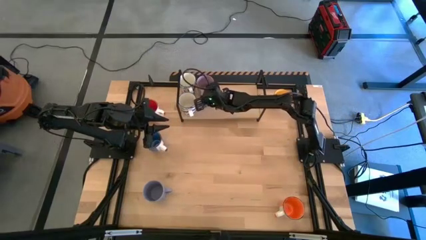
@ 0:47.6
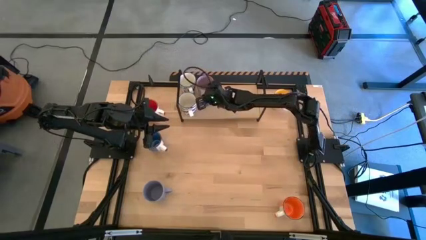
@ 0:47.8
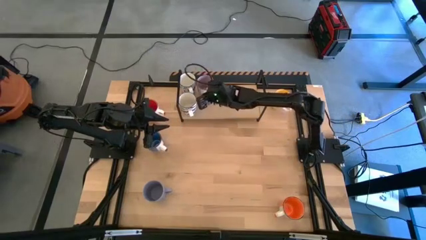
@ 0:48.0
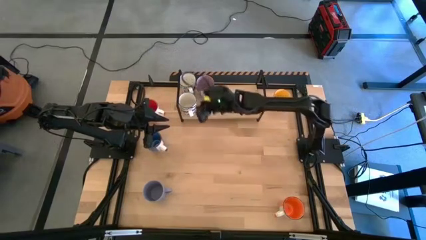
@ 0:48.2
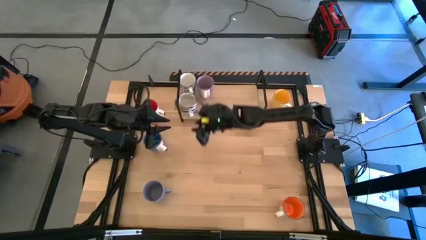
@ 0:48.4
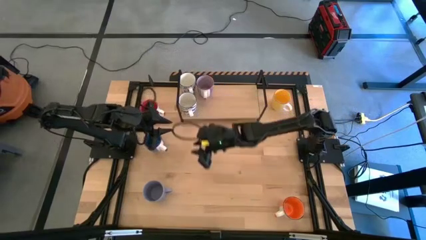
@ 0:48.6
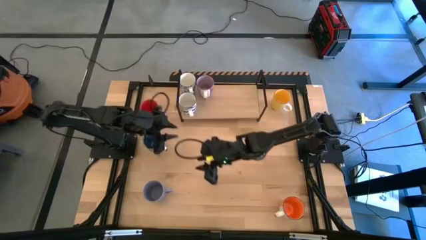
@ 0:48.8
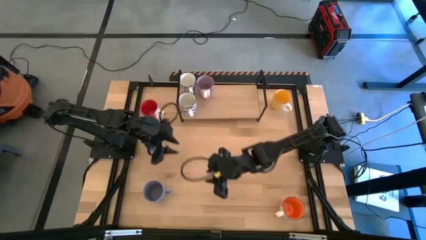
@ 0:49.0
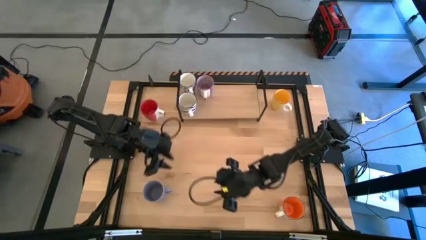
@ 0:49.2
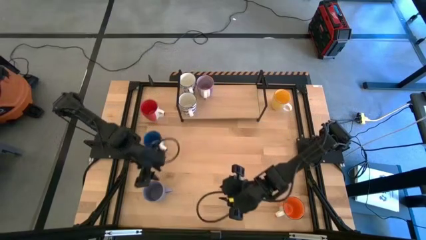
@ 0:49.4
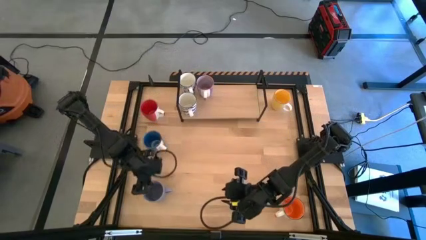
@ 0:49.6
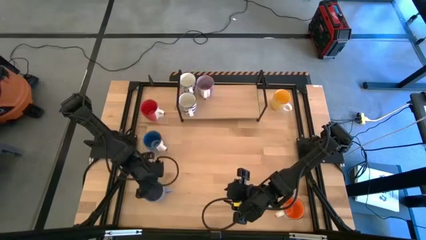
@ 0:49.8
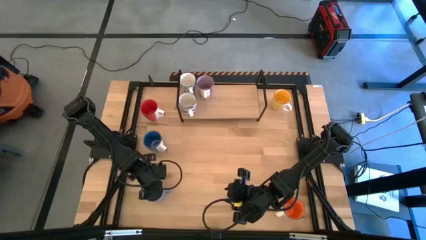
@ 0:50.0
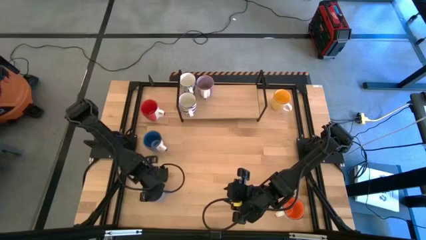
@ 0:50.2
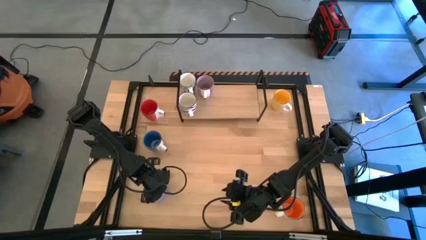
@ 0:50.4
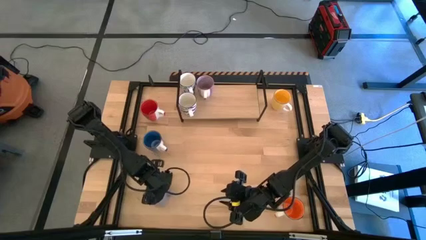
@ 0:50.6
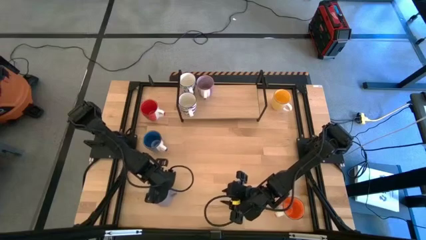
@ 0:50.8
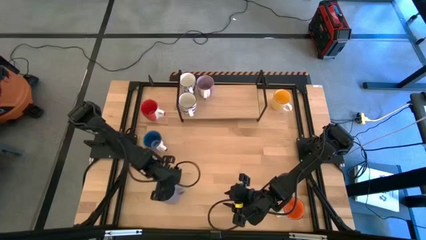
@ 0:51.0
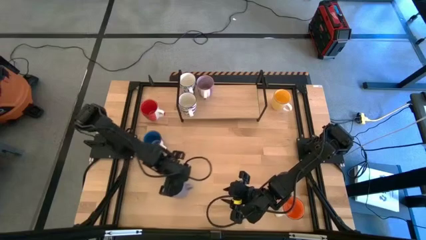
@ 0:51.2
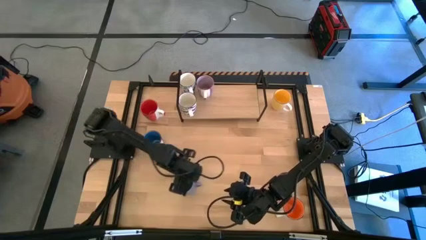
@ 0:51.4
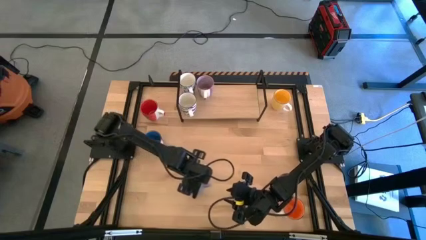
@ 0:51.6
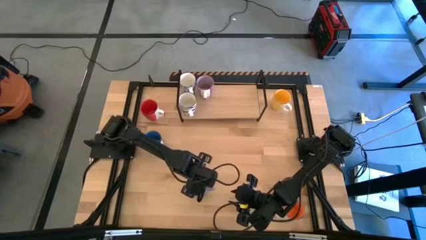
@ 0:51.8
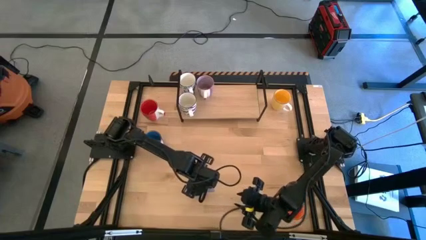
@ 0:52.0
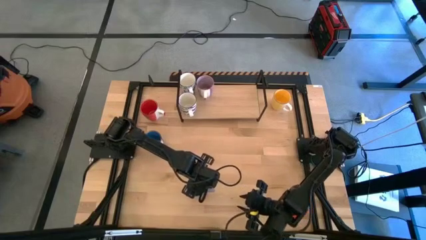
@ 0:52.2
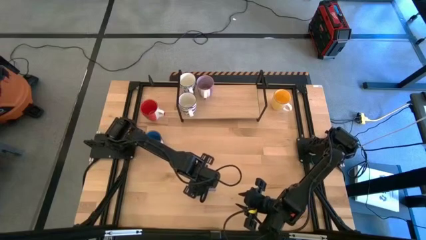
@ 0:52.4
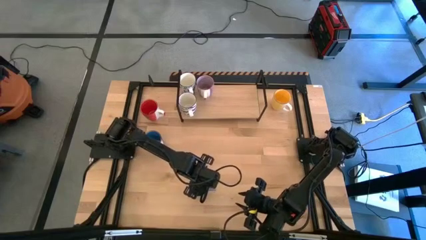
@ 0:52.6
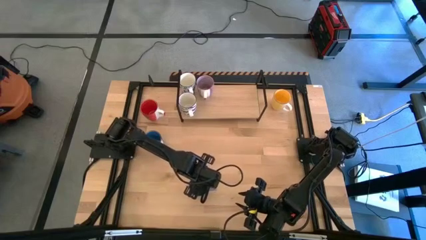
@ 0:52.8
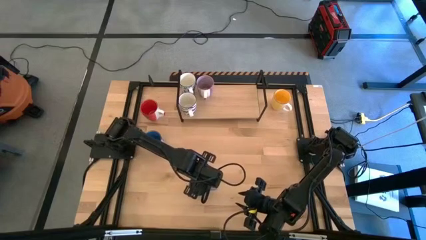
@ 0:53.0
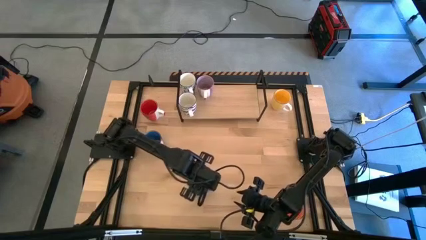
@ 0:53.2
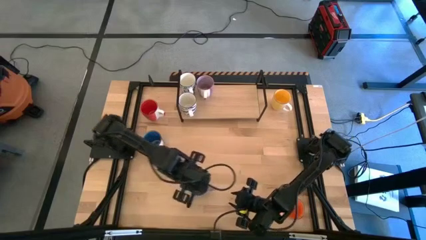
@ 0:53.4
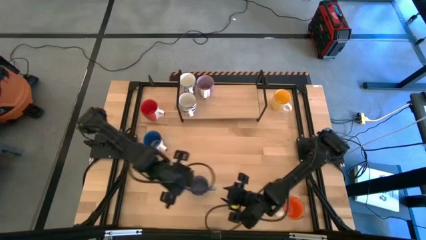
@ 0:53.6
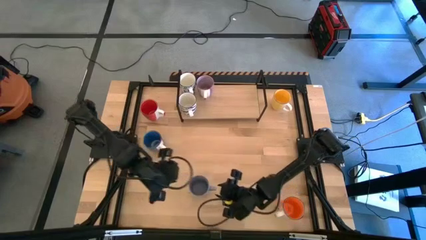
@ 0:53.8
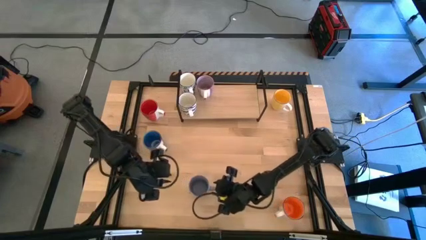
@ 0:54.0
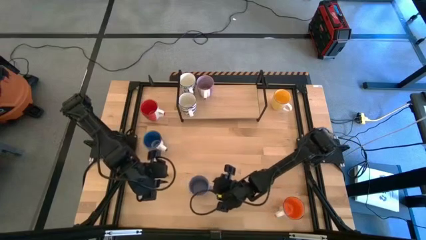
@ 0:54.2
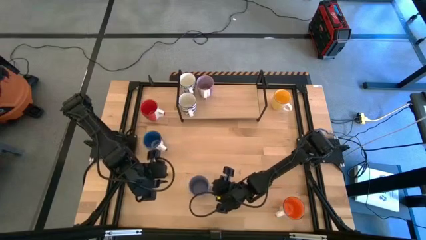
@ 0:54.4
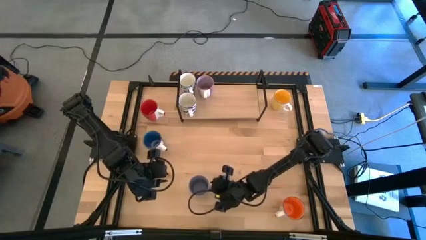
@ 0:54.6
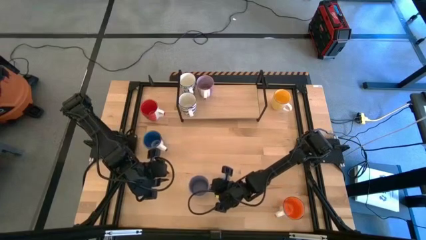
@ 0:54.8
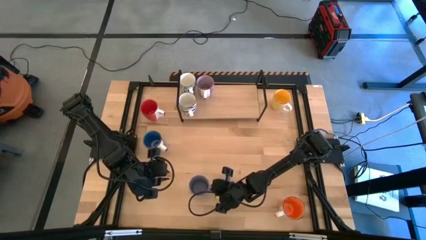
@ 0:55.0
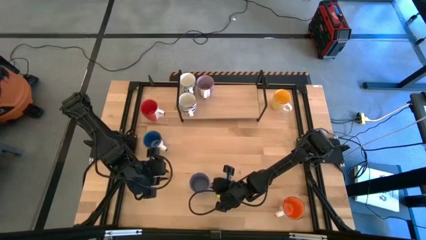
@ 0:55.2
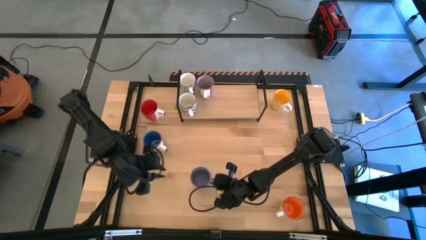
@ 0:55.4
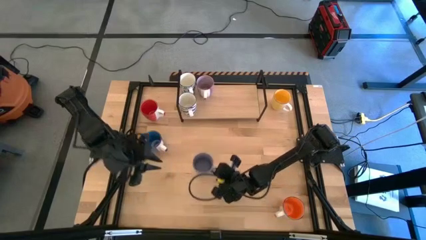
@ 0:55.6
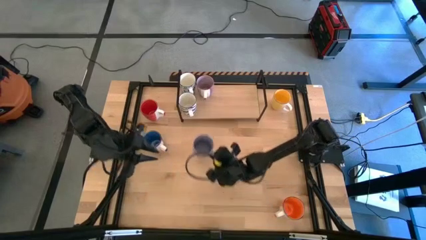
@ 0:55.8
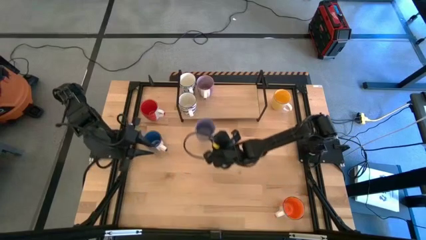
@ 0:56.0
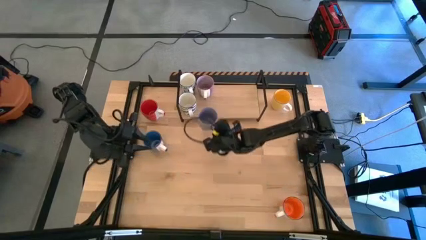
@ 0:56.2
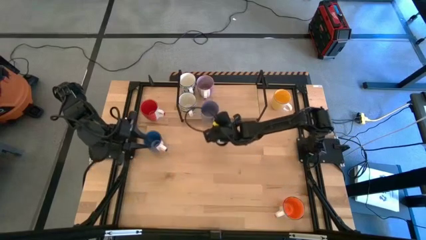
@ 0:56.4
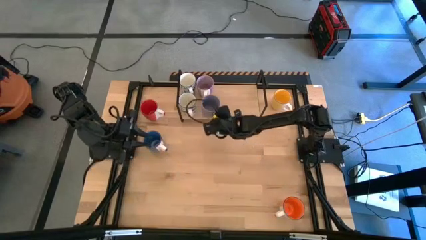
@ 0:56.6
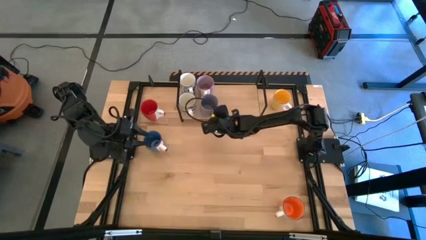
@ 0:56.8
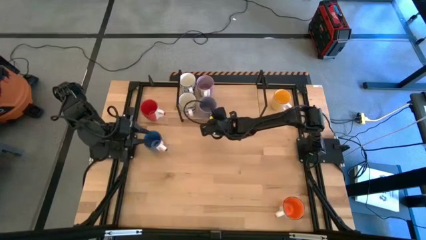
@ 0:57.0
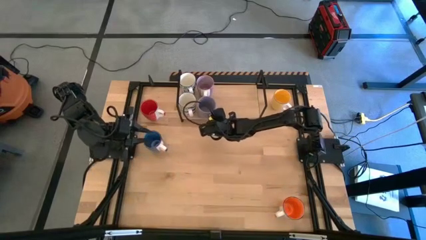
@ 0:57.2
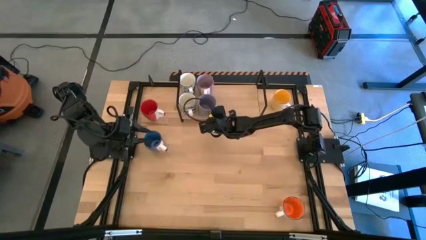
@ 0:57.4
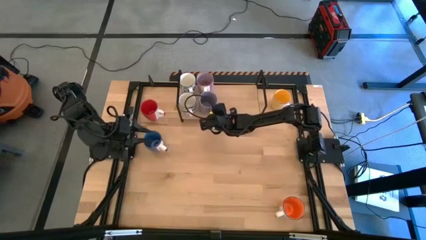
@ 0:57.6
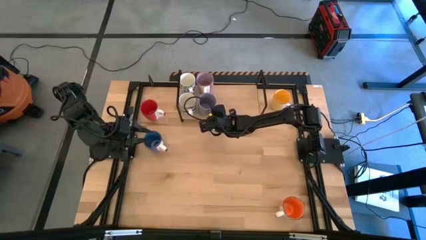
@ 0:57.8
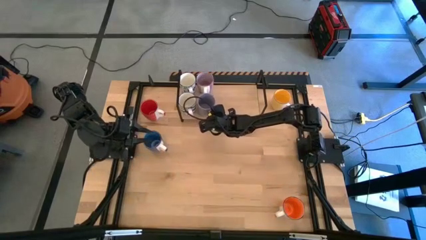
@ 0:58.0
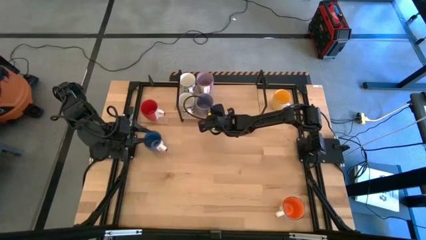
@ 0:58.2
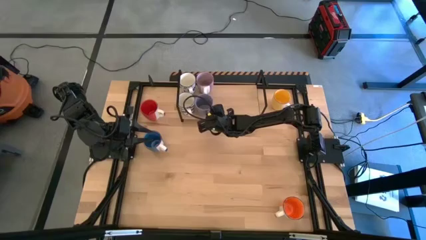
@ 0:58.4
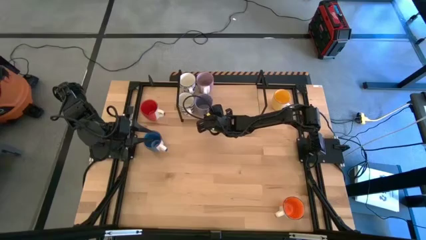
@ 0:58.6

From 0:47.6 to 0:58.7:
Task: Place coffee mugs
Put the bottom blue mug on the shelf
